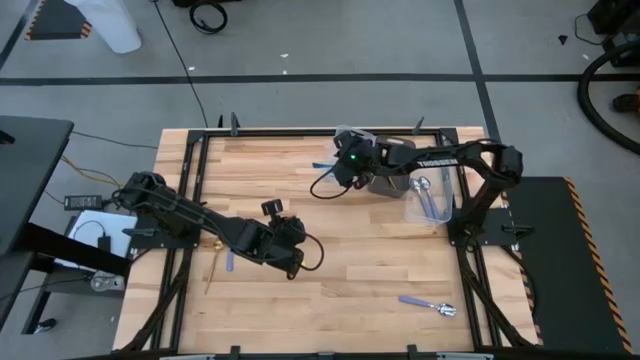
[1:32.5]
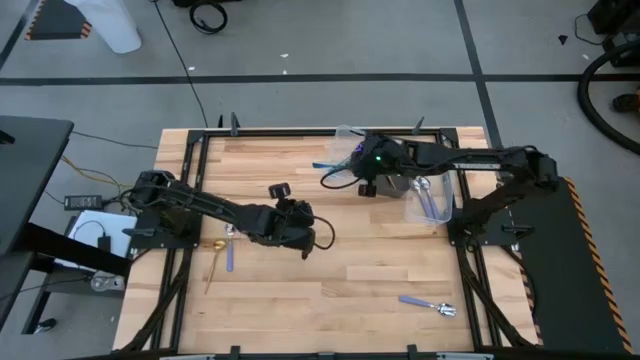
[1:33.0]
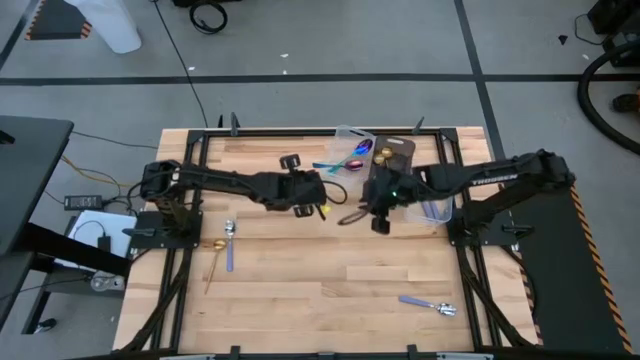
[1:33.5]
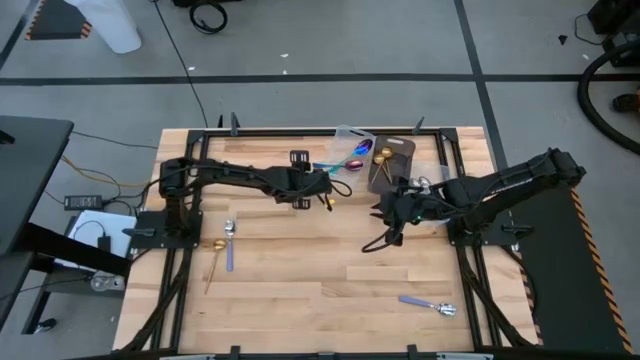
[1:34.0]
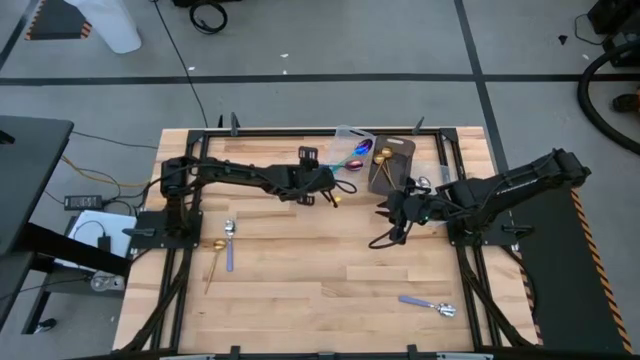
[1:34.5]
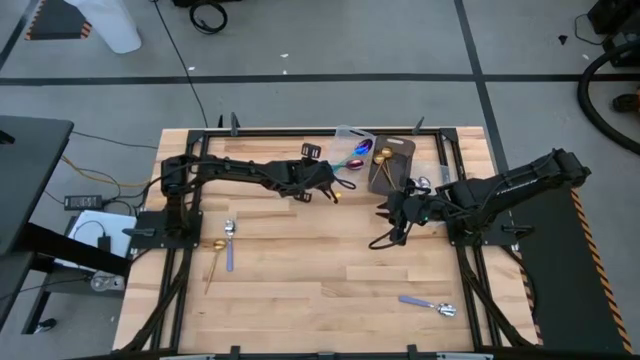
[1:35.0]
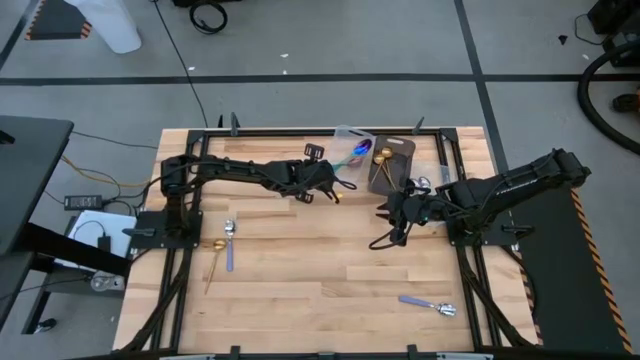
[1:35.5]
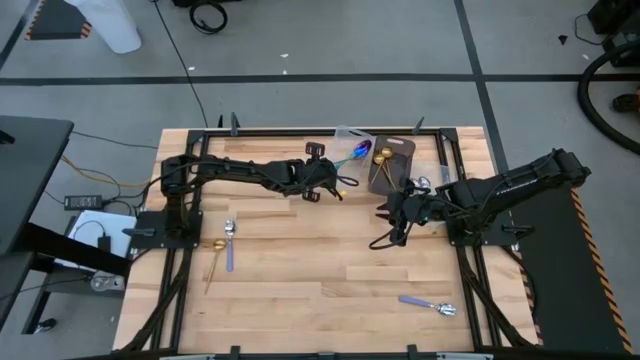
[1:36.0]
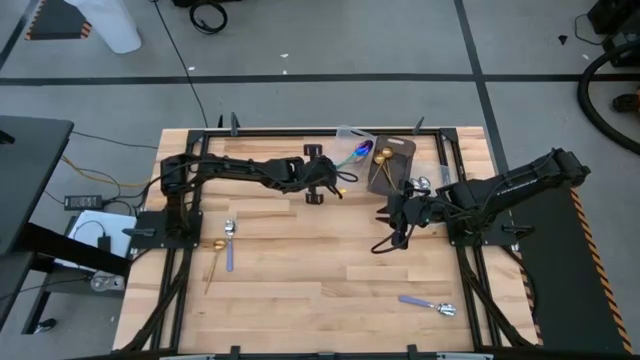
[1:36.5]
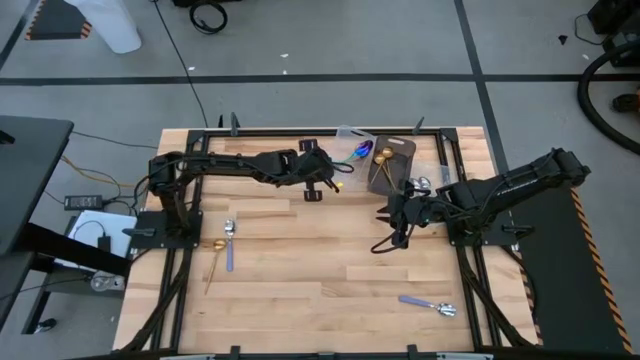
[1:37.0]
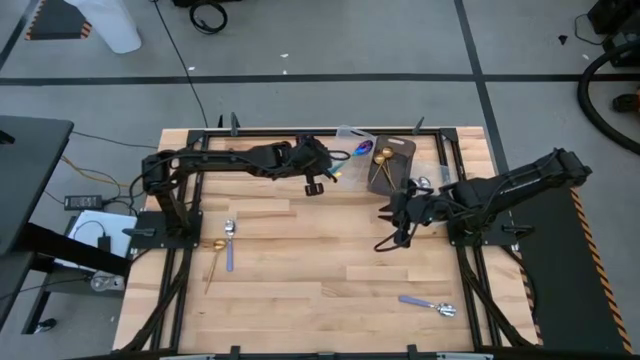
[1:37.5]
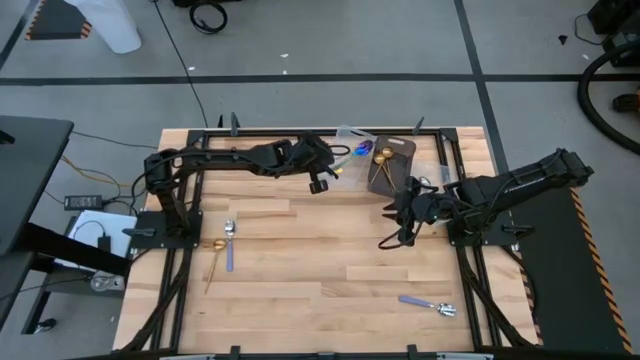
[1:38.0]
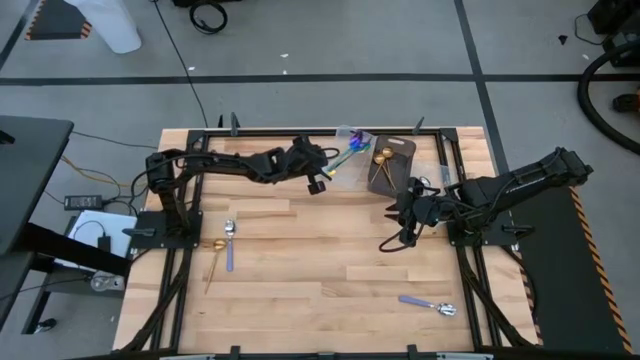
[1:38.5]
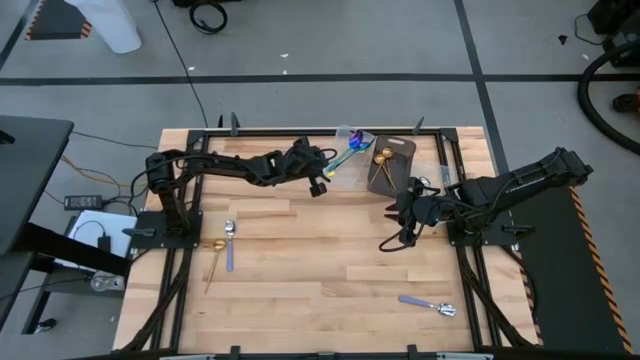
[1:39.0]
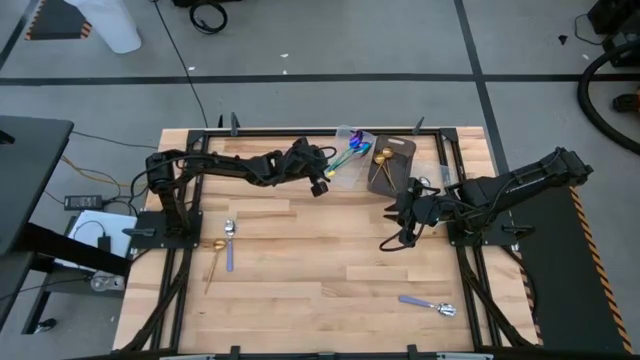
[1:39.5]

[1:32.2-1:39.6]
Task: Sort silverware by color (type)
Put the blue spoon into the left transparent bin

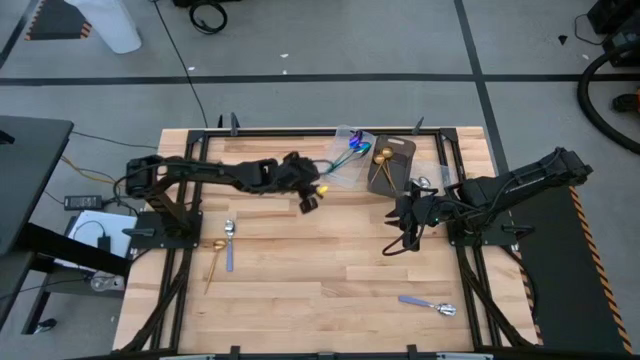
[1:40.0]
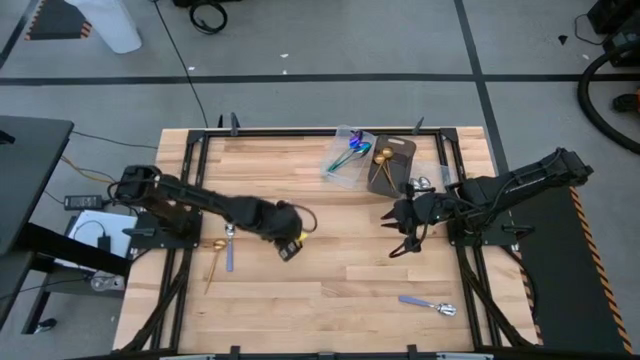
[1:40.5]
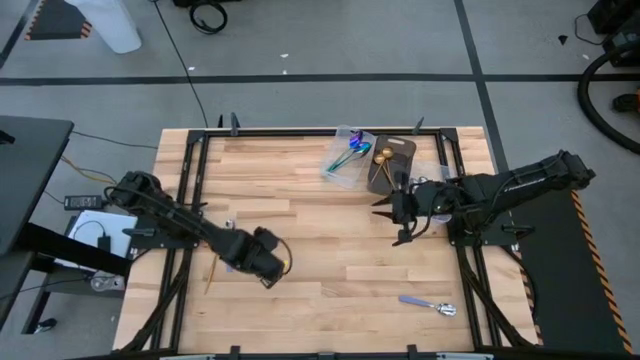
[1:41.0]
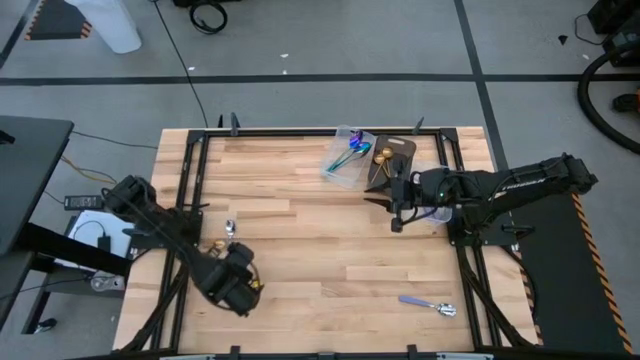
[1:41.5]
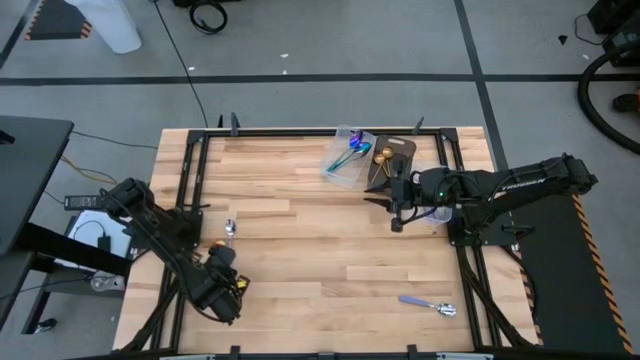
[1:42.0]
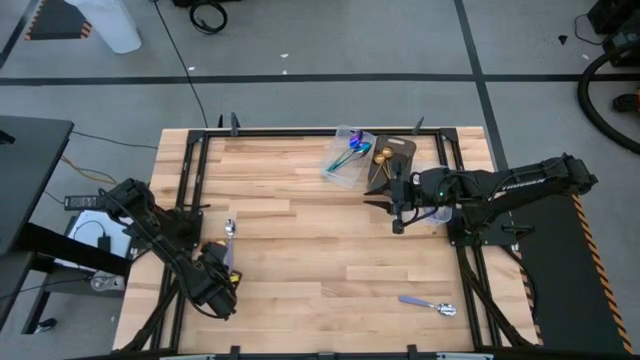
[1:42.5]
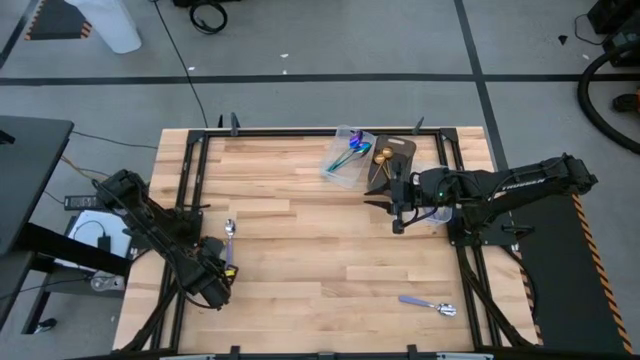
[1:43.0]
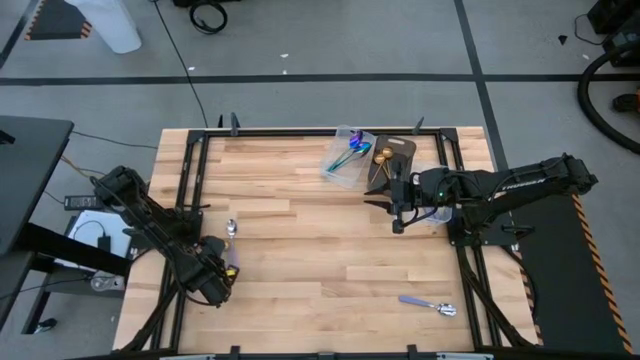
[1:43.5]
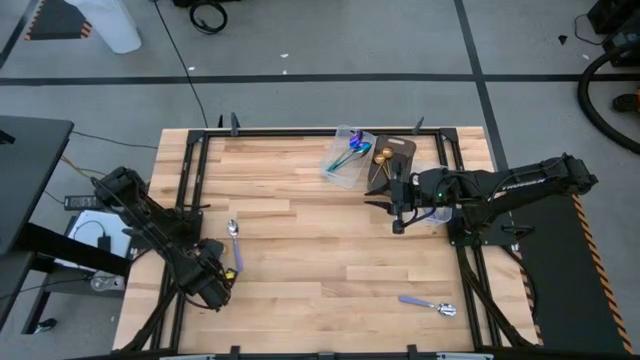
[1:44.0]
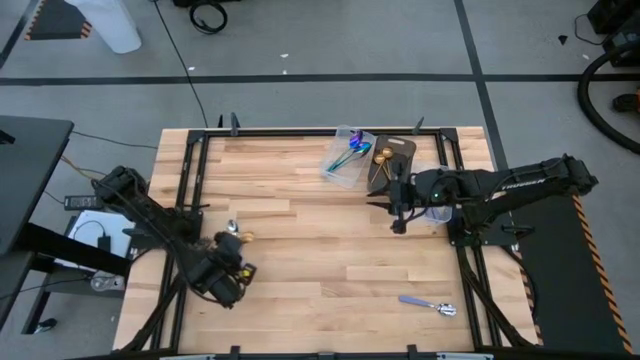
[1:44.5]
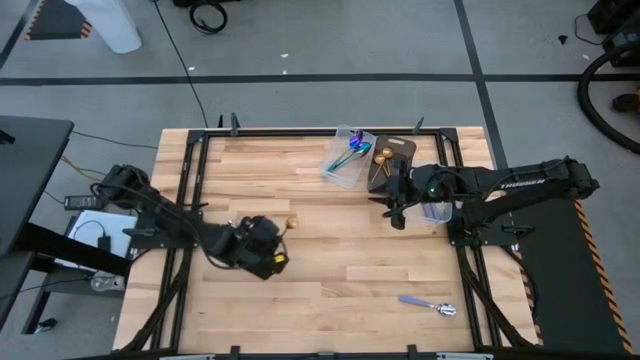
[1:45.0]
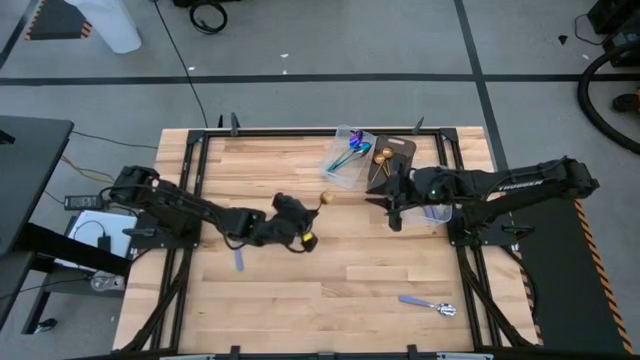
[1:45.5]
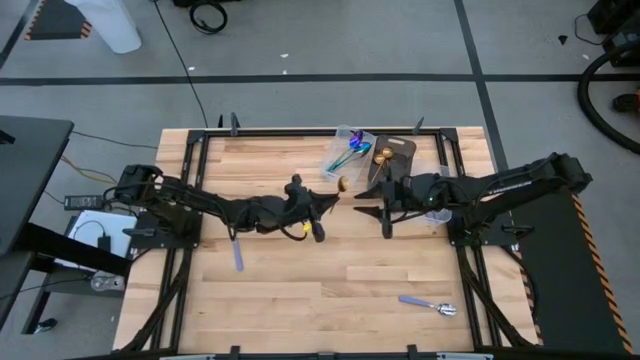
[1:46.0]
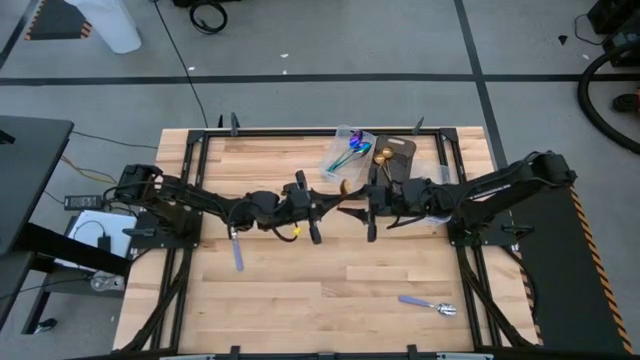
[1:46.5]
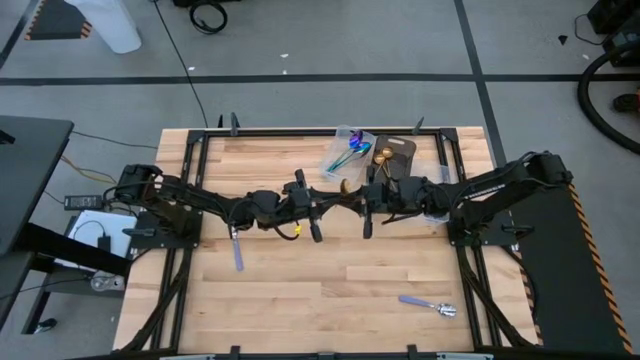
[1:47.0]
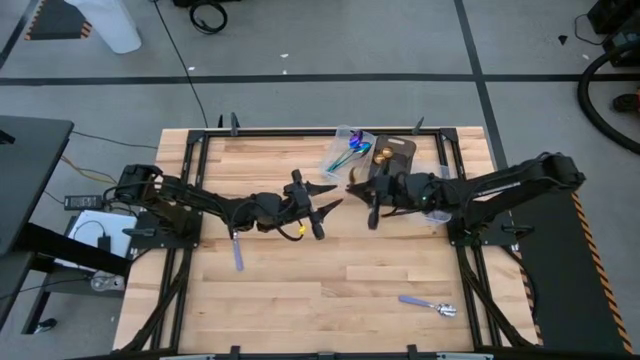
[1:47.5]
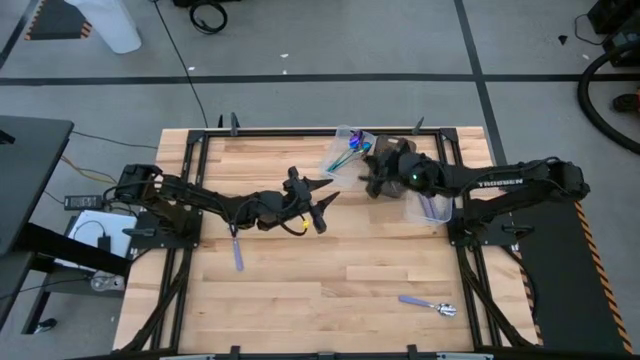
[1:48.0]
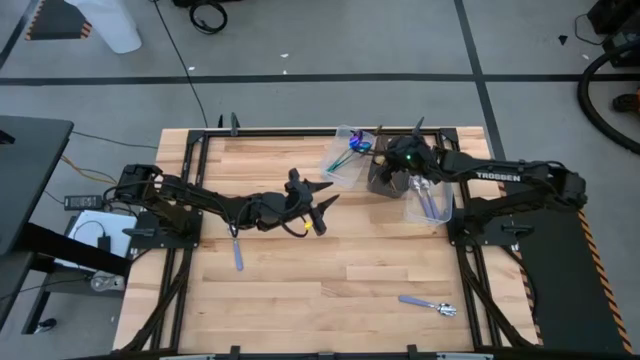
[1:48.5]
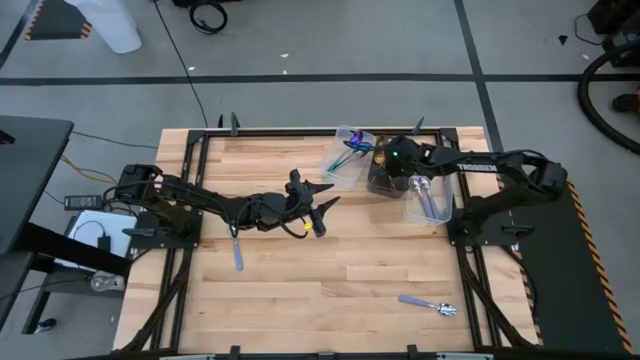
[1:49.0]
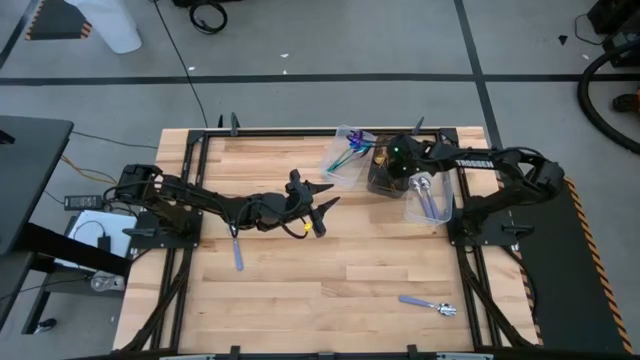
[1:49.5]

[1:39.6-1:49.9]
Put the gold spoon into the black bin

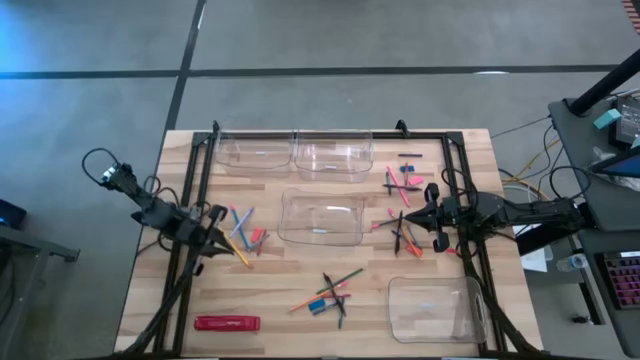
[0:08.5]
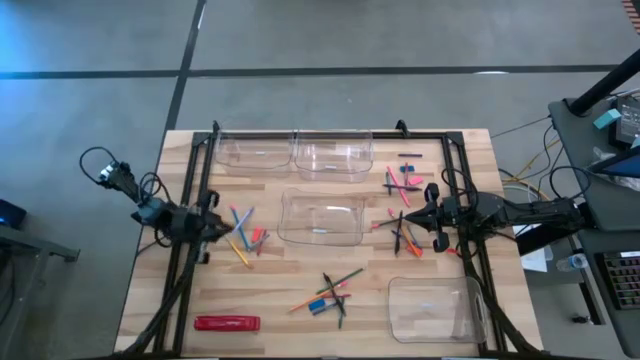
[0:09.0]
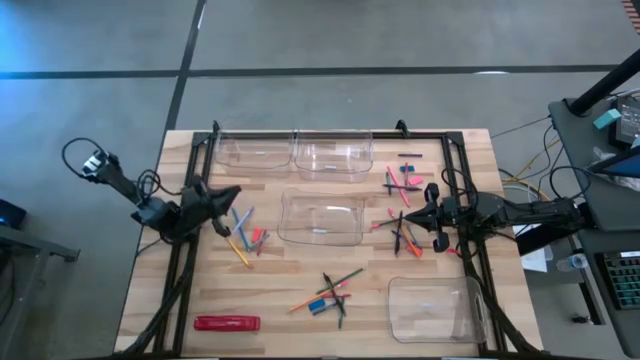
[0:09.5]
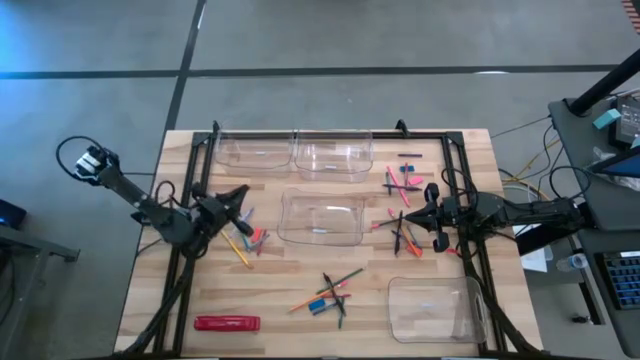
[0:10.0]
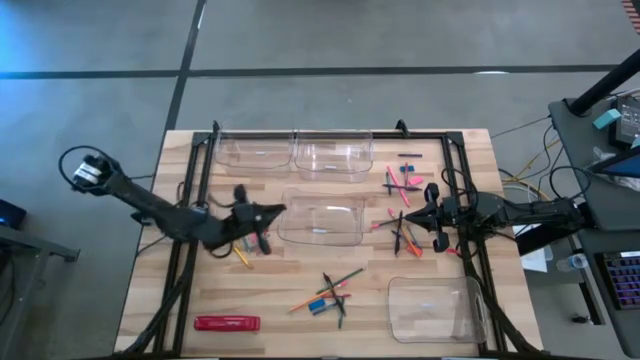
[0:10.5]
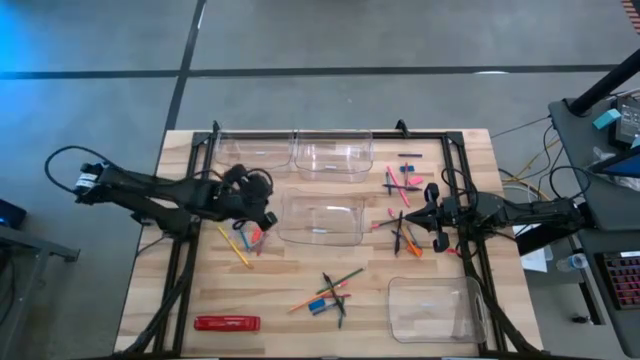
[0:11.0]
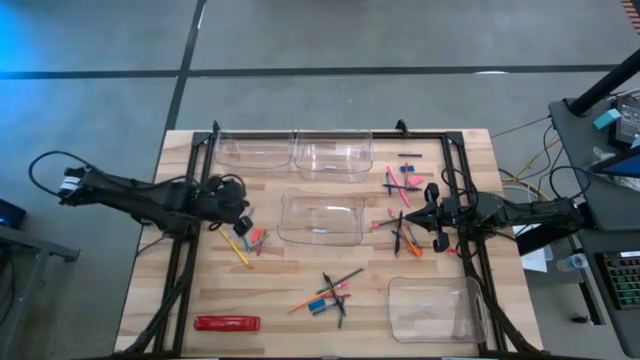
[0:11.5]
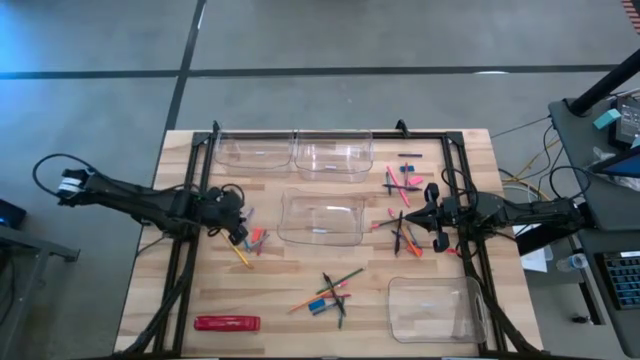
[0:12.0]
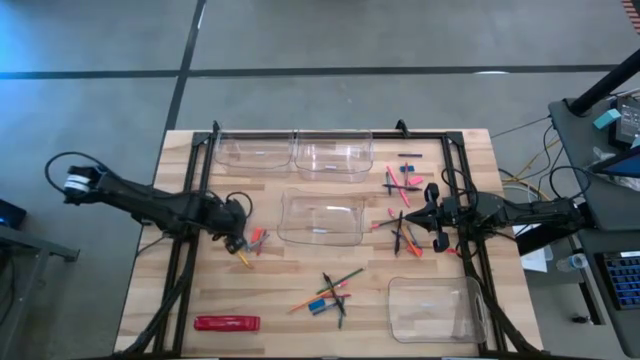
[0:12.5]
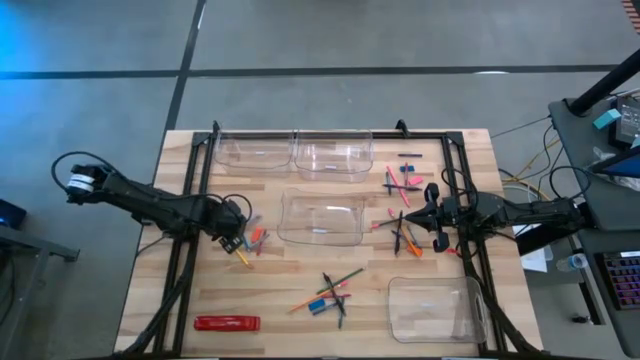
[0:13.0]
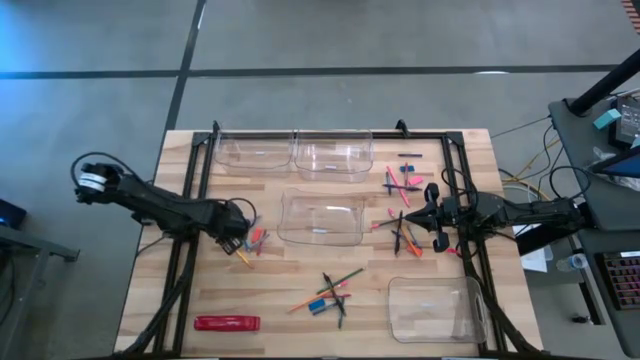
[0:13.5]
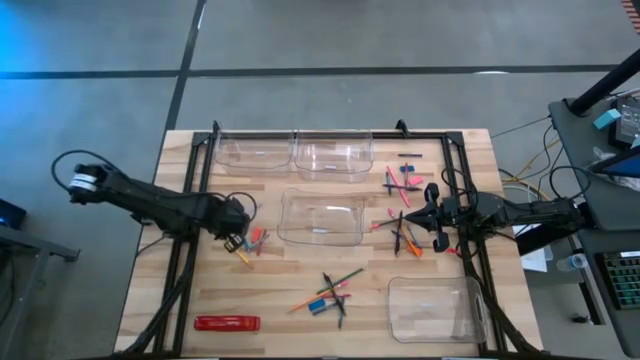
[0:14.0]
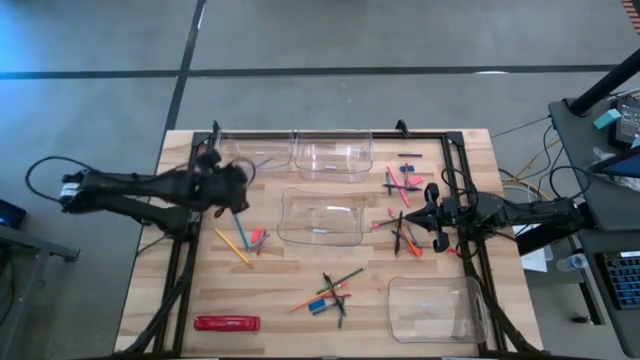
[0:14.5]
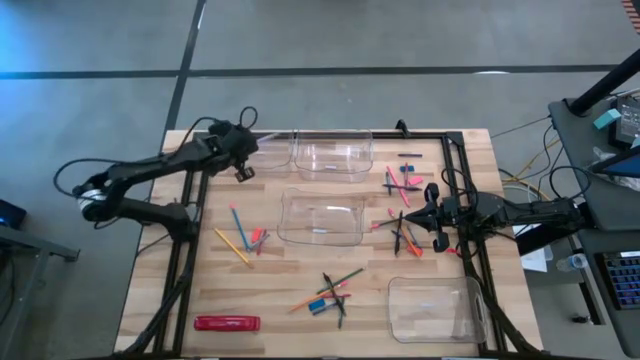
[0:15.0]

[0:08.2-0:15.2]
Task: Sort crayons/erasers/pens/pencils in bins
Put the purple pen into the top left transparent bin
